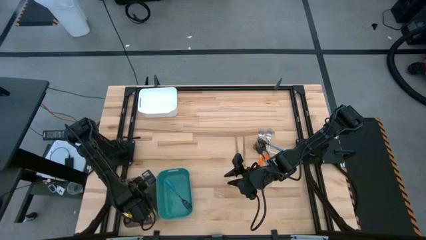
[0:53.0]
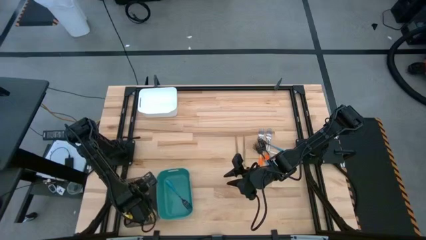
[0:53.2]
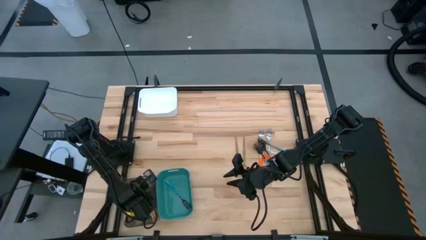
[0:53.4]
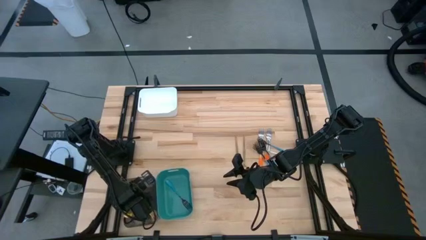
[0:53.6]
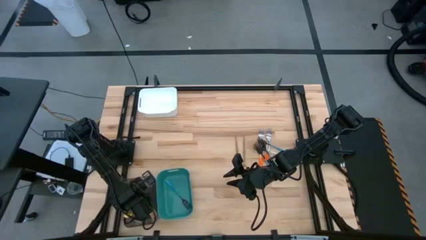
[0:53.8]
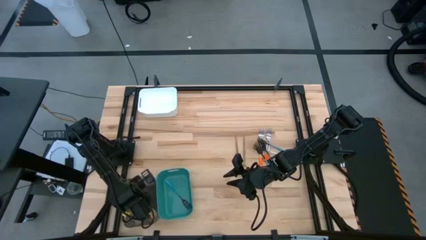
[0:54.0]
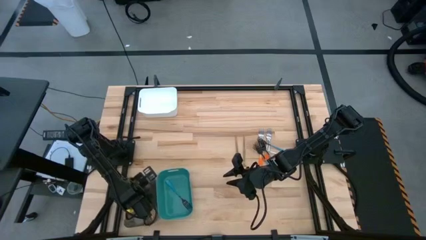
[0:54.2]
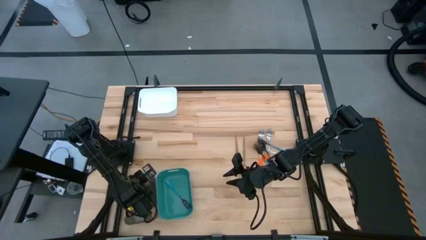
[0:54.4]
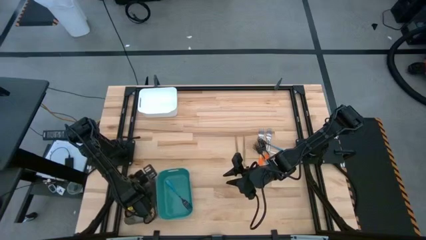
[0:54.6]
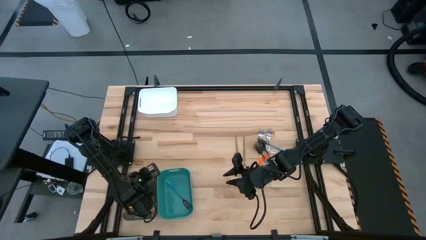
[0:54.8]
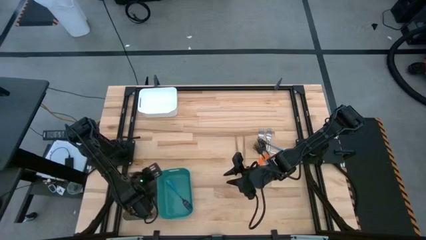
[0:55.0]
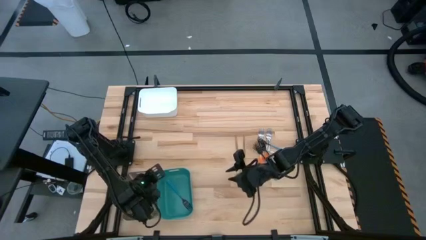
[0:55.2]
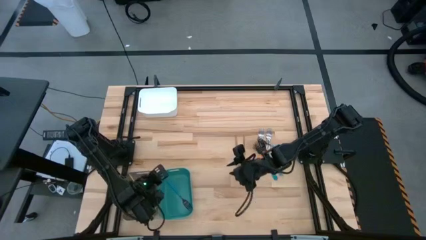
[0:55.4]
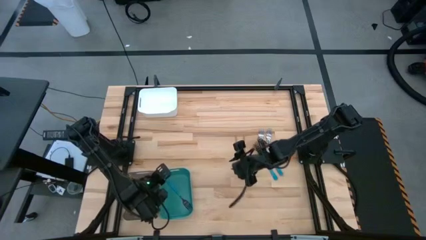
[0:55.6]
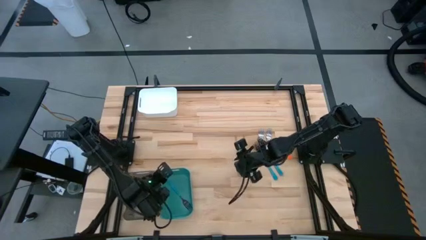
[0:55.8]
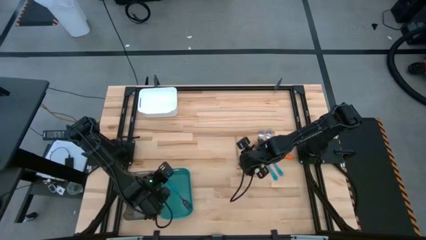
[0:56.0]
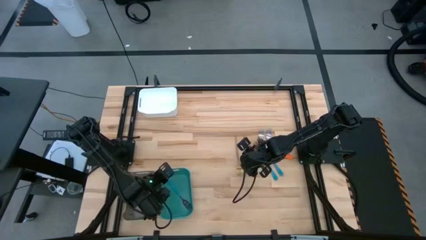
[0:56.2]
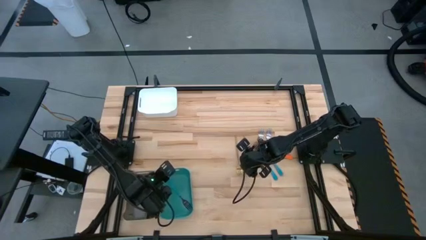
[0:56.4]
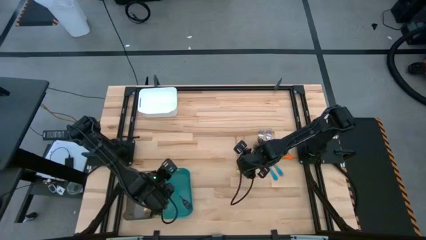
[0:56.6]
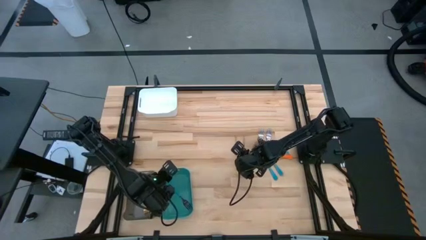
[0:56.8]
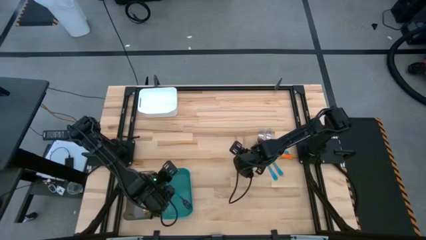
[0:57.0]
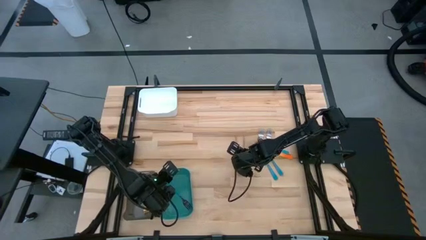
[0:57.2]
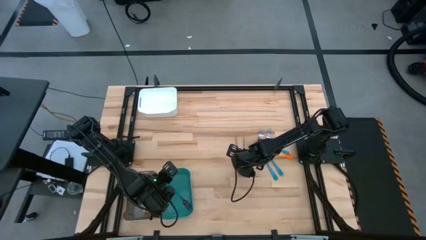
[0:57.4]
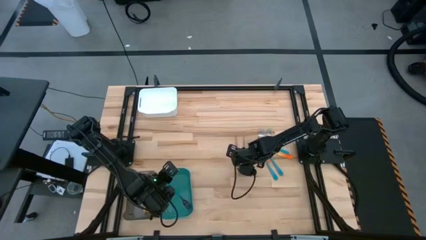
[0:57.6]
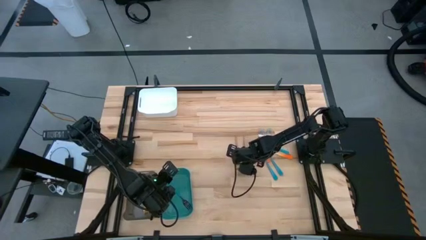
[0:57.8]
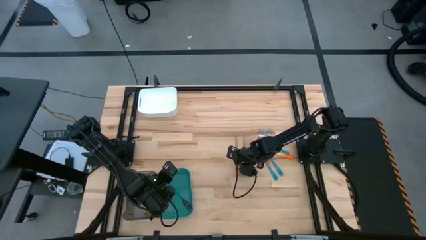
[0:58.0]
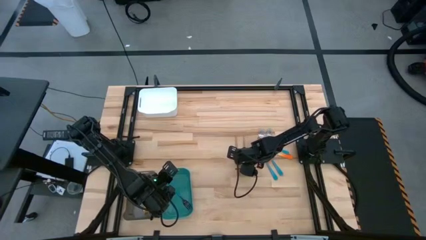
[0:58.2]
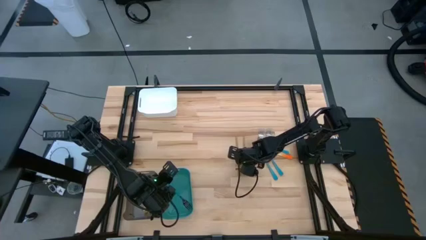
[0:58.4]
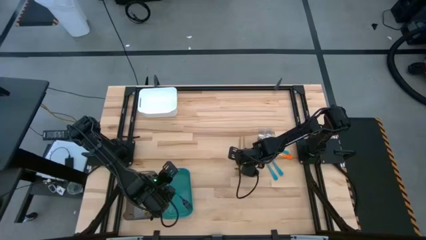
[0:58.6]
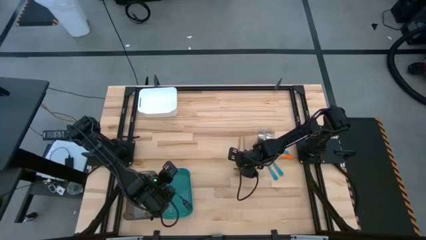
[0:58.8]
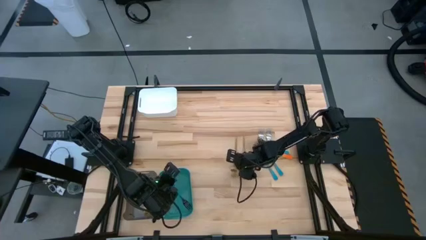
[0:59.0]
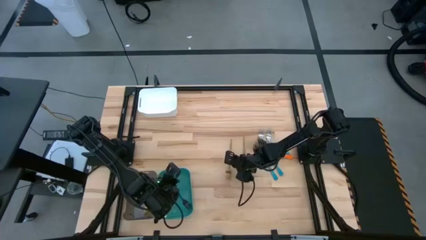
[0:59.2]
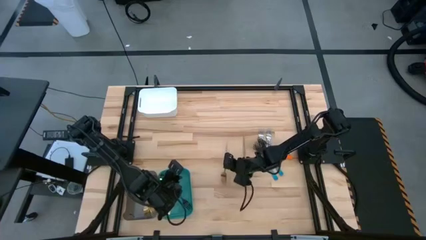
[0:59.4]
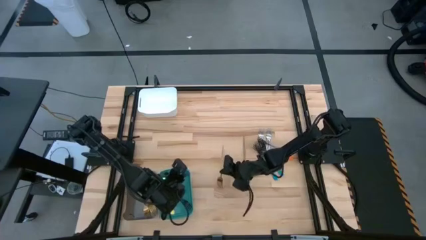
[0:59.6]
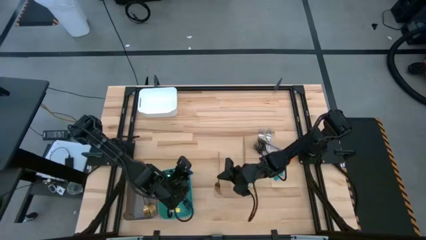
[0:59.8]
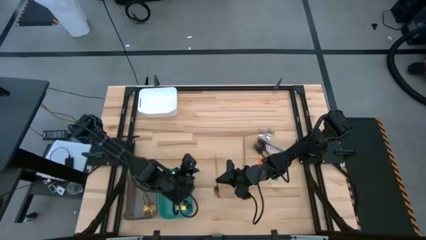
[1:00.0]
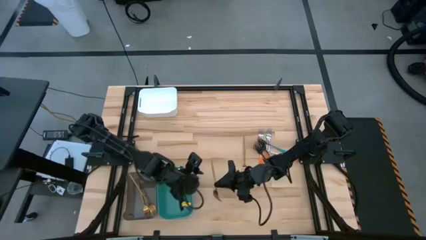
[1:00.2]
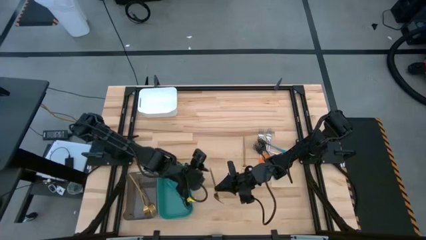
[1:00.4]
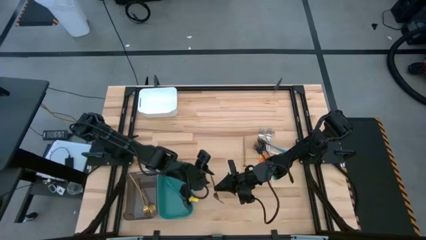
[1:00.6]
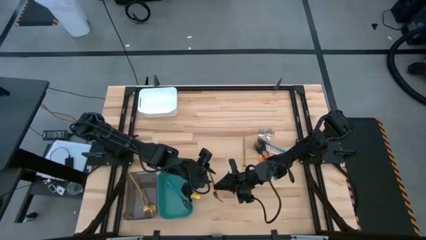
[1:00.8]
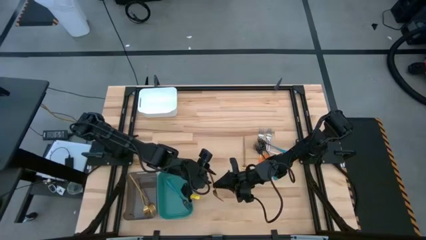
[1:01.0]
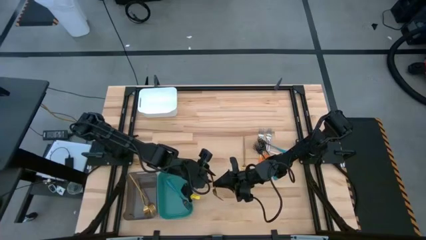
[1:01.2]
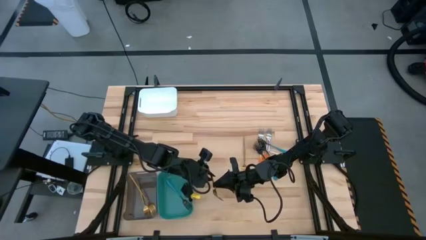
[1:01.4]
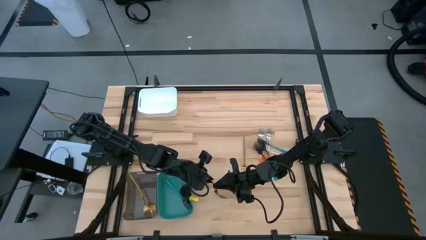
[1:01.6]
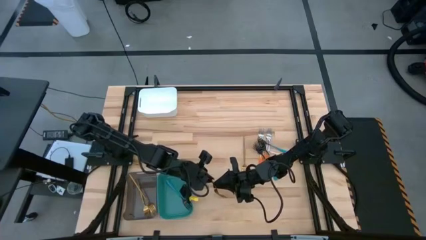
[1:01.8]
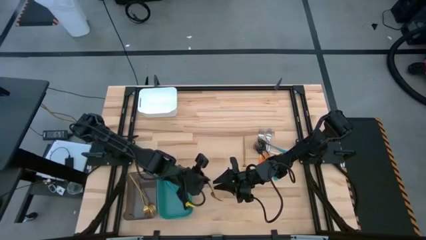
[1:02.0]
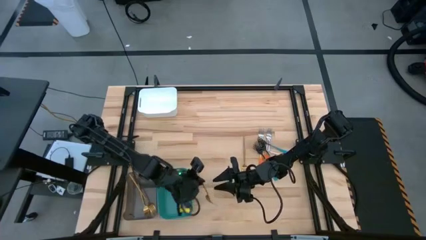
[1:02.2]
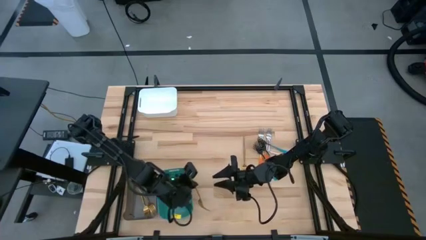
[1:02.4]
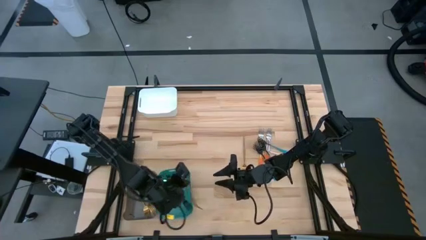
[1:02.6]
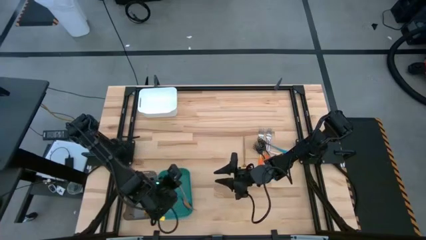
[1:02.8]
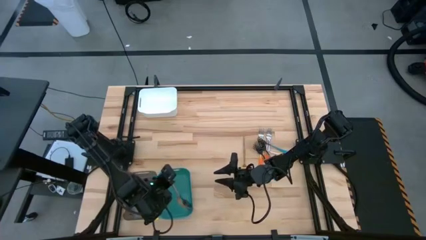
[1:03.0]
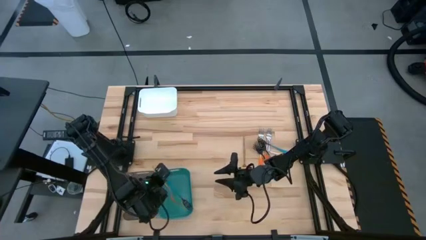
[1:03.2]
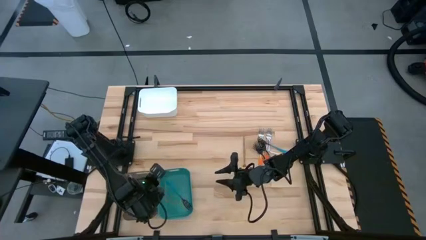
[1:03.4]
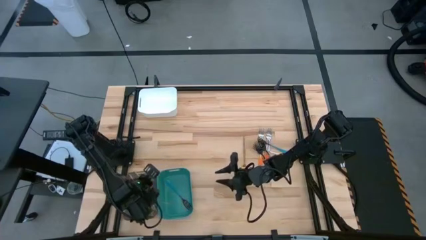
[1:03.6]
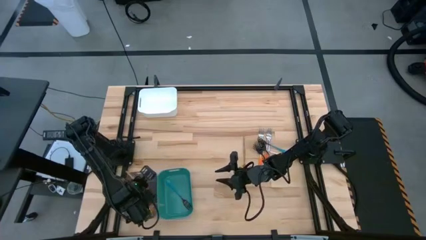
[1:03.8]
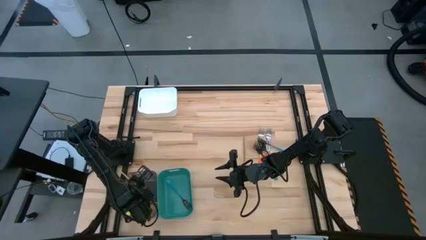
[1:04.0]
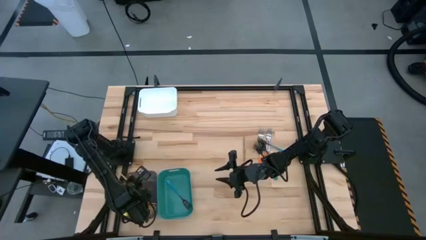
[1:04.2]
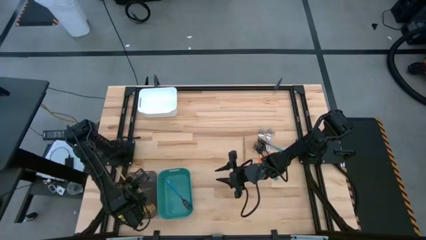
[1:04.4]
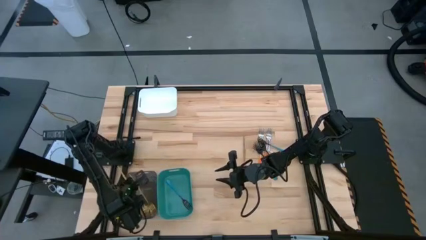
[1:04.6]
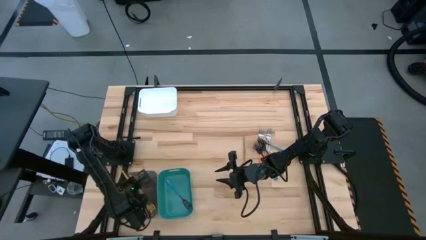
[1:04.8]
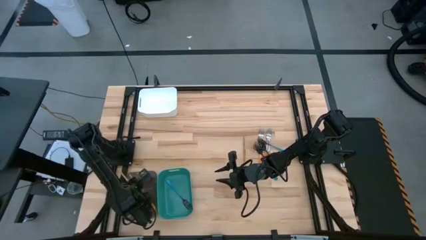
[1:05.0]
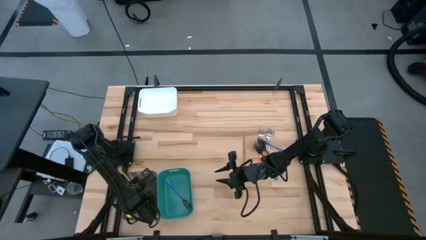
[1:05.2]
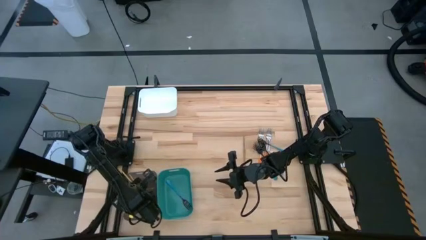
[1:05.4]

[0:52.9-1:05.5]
Task: Sort silverware by color (type)
Put the gold fork into the black bin
